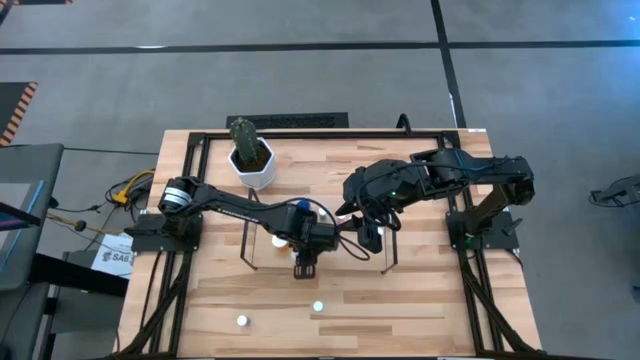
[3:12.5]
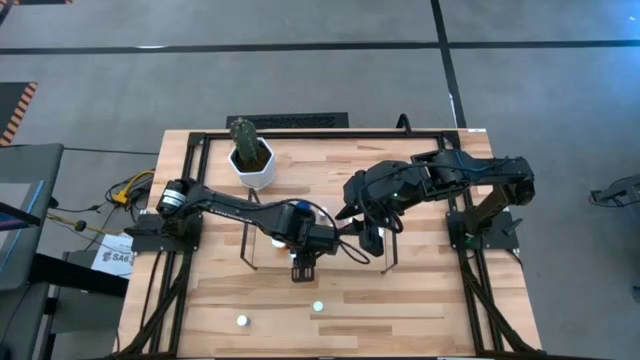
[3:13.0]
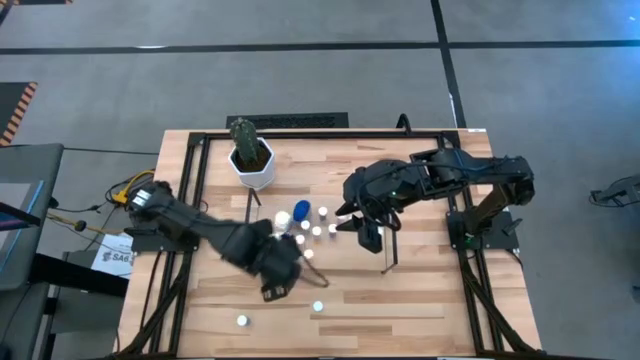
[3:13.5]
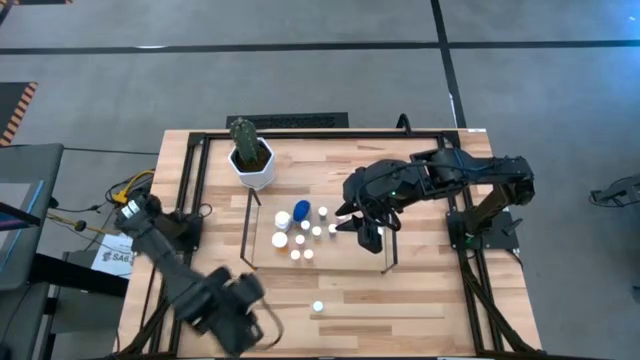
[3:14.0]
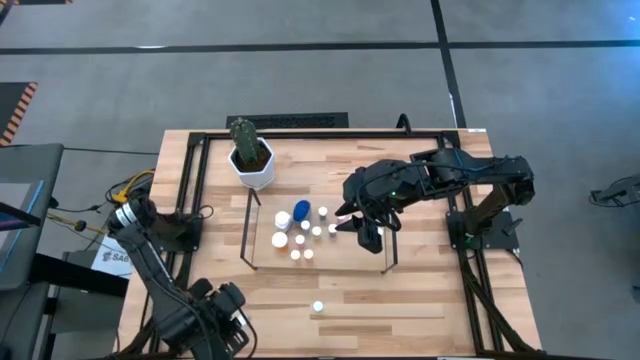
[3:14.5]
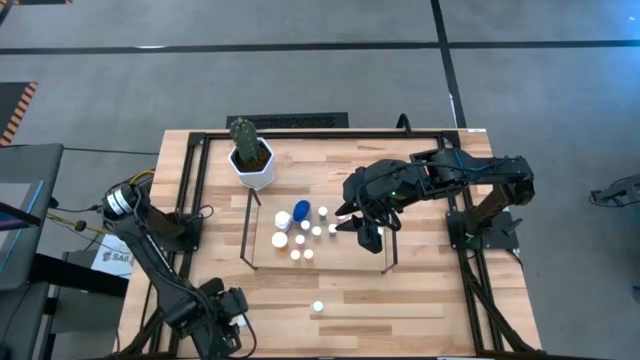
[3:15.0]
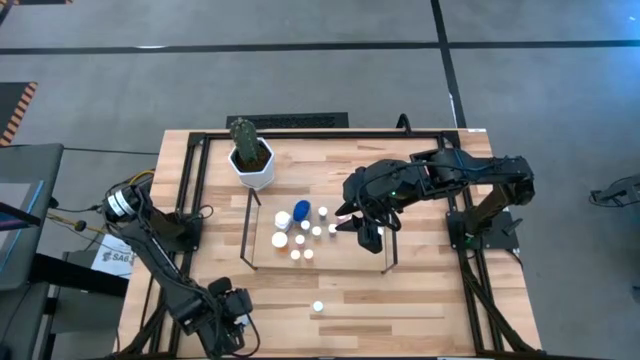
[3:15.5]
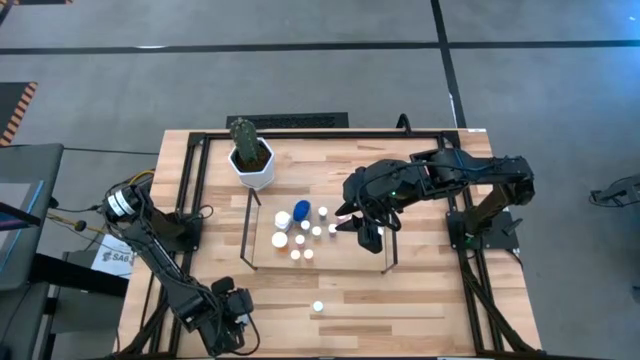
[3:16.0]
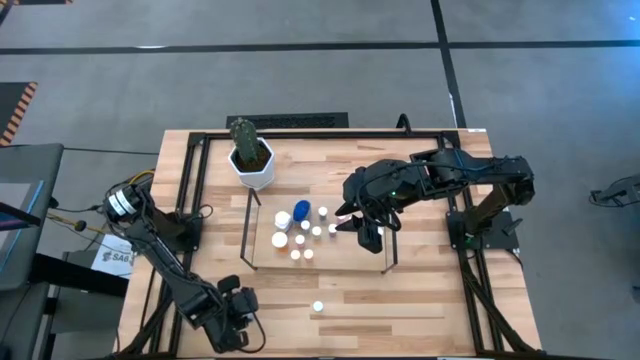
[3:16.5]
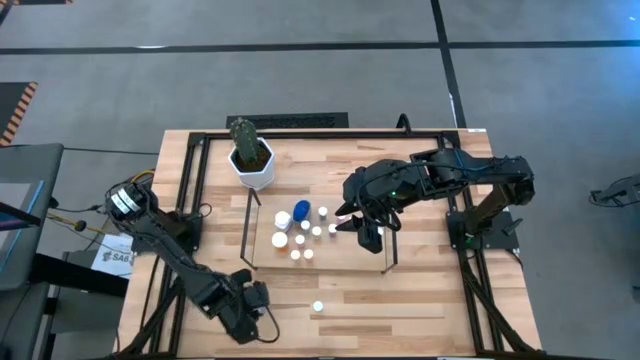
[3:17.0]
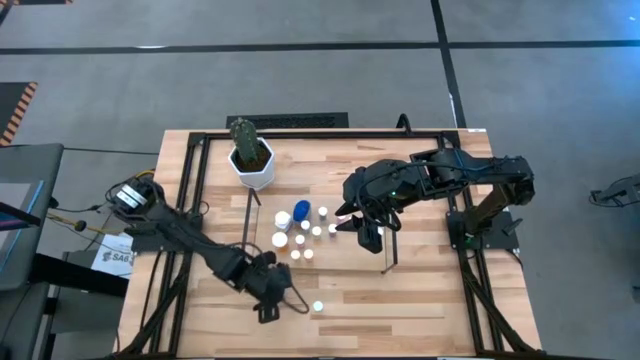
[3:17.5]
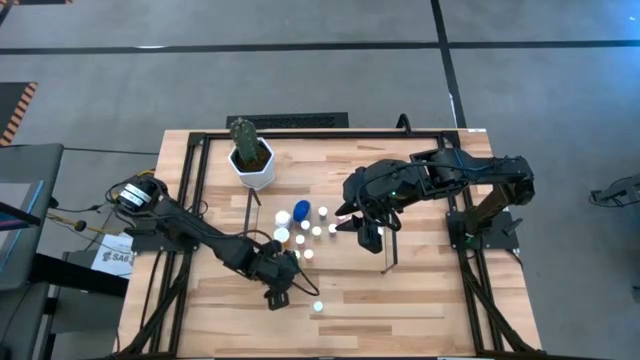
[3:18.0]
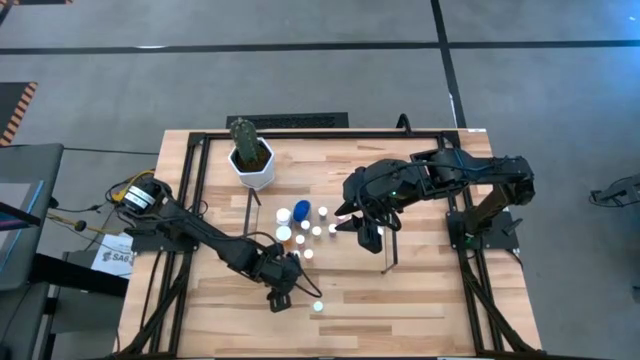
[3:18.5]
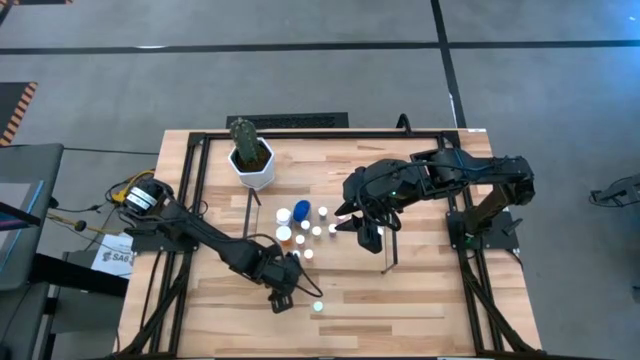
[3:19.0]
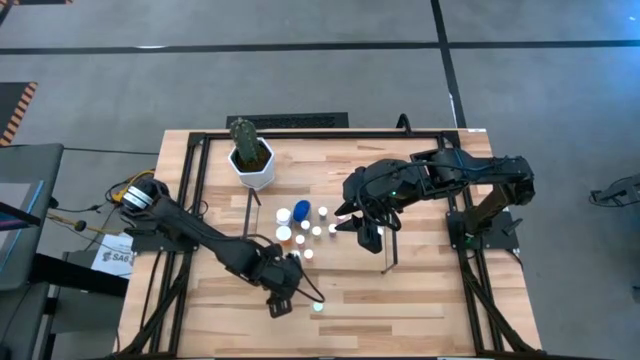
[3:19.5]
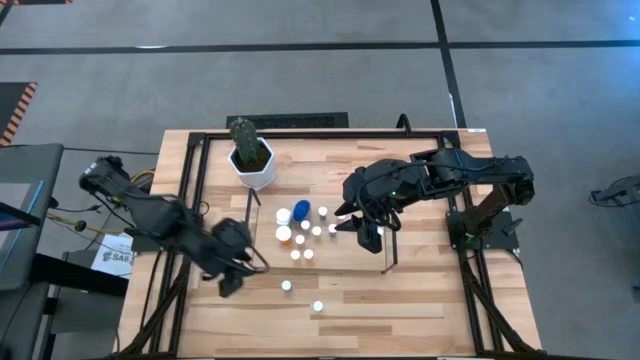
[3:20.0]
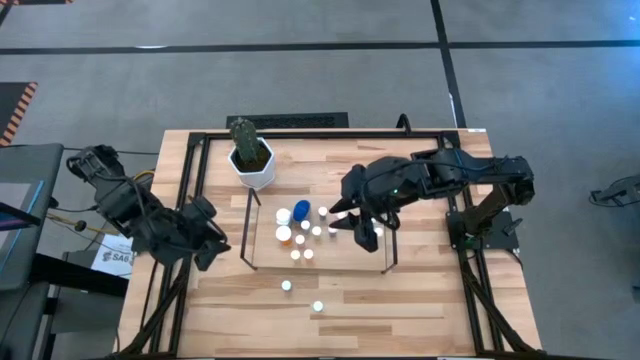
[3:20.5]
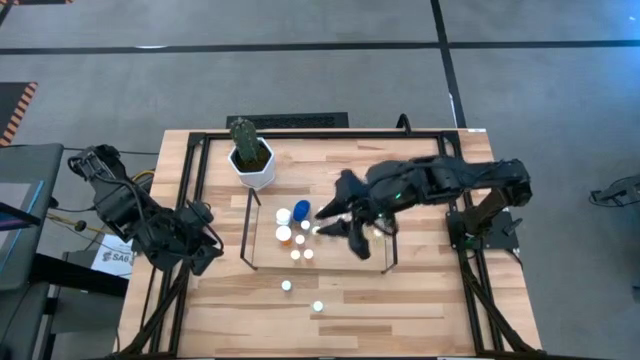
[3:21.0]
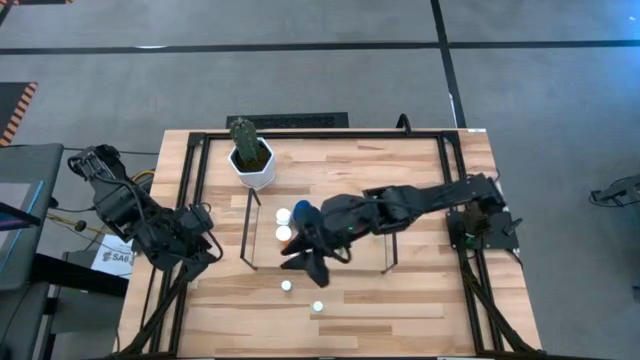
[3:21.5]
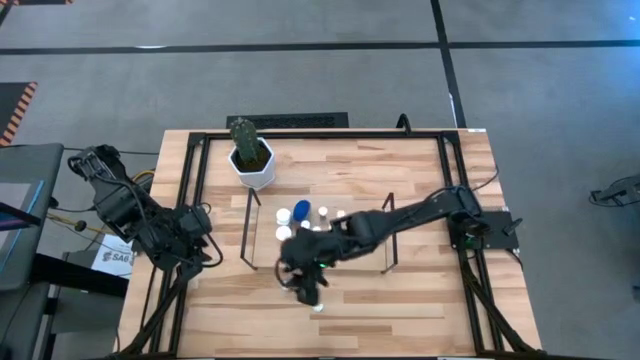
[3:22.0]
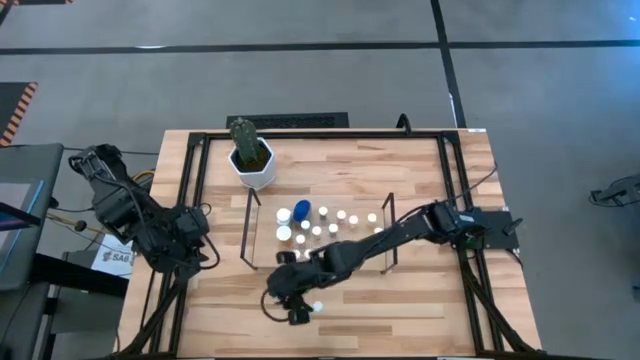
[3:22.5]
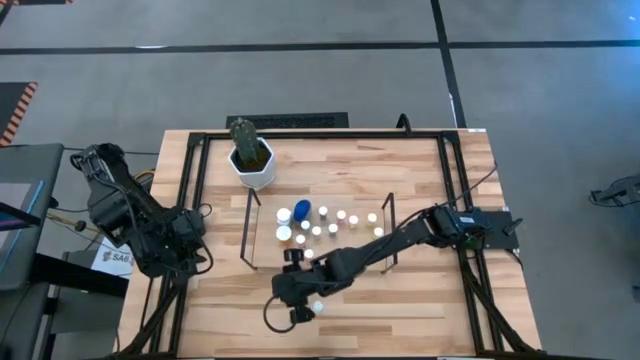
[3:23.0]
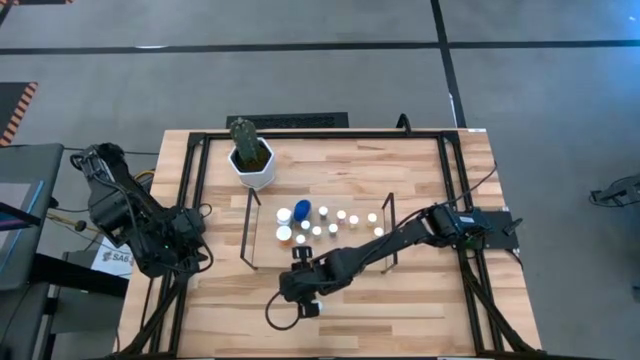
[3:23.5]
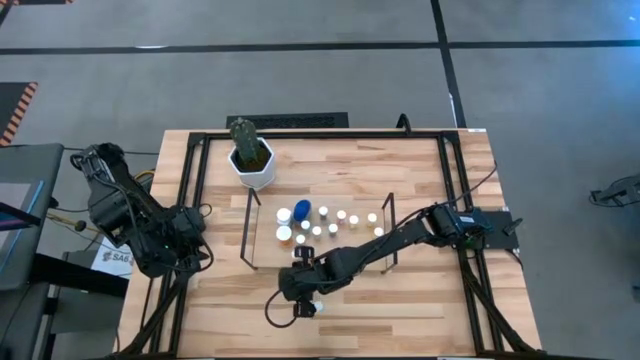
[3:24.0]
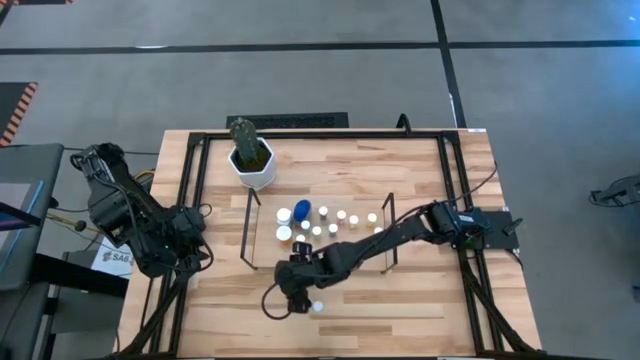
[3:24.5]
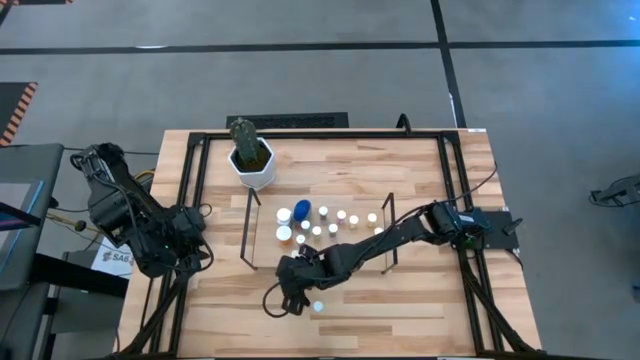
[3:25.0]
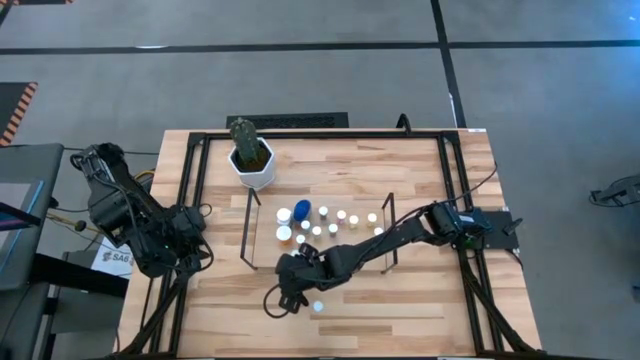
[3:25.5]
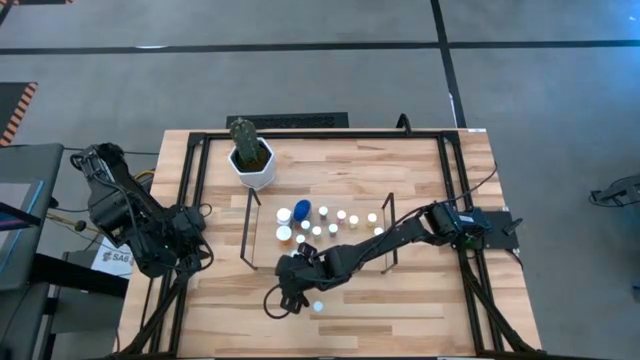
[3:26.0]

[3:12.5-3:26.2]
Task: Pick and place medicine bottles onto shelf by color
Put the blue pill bottle on the shelf

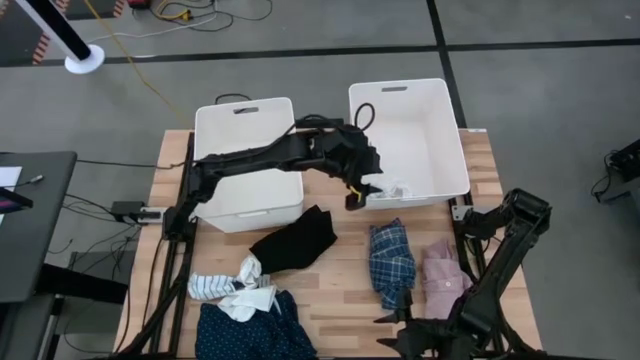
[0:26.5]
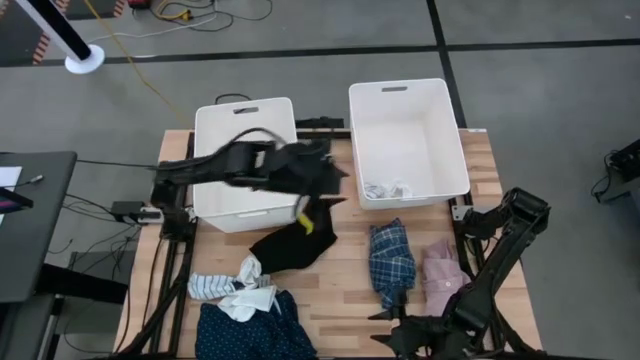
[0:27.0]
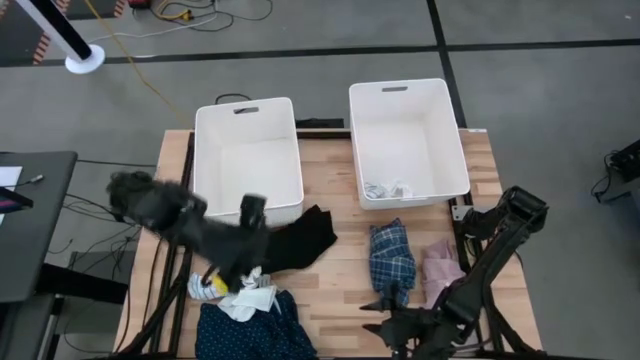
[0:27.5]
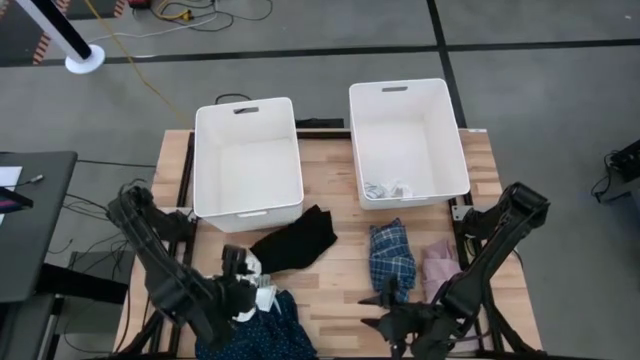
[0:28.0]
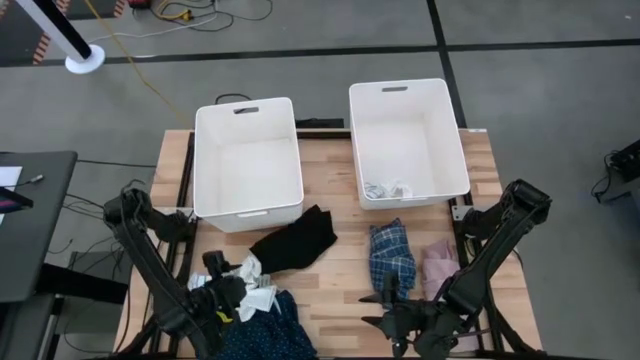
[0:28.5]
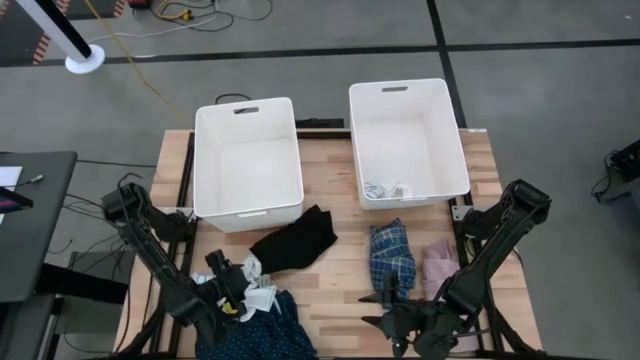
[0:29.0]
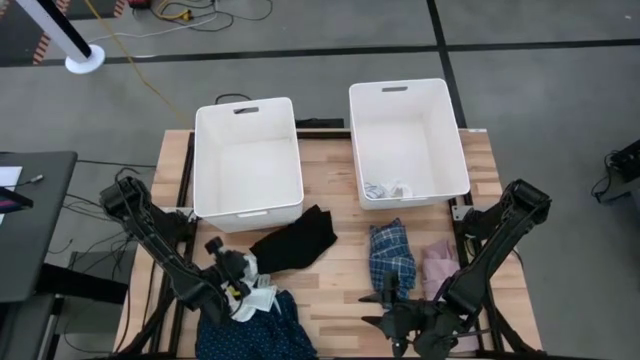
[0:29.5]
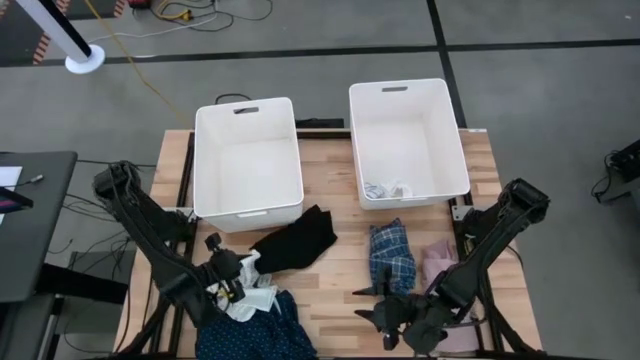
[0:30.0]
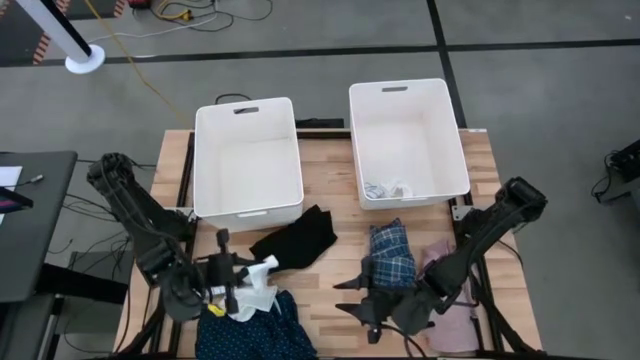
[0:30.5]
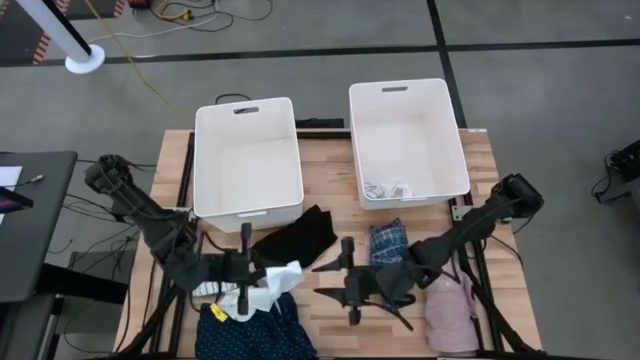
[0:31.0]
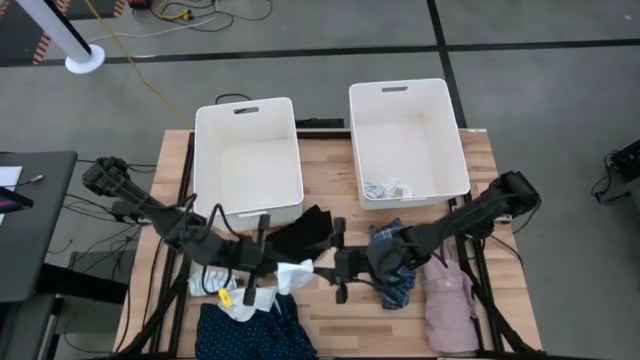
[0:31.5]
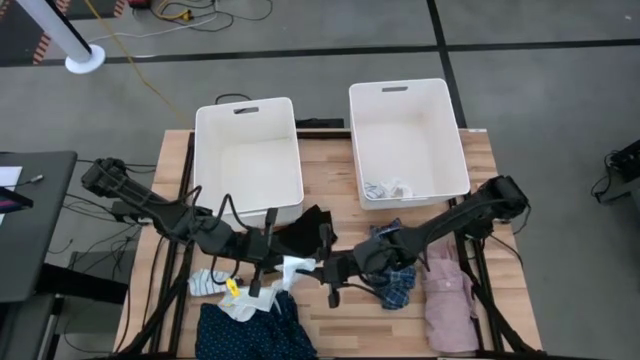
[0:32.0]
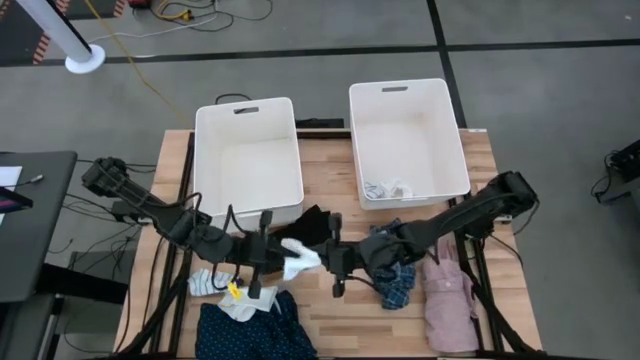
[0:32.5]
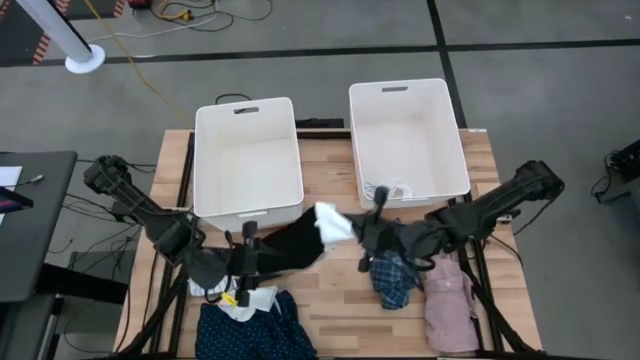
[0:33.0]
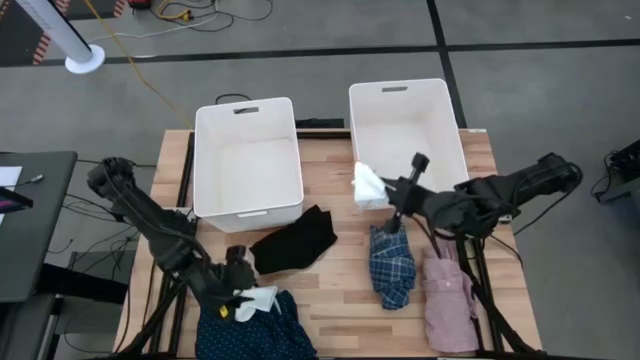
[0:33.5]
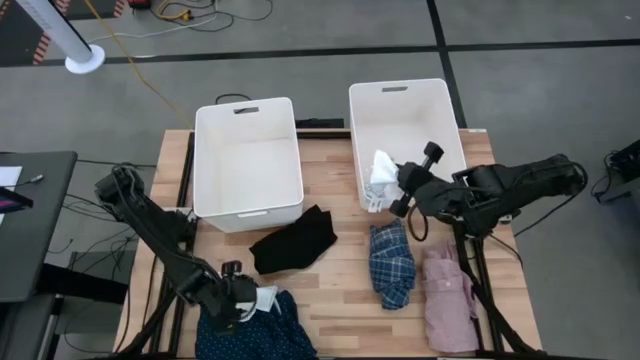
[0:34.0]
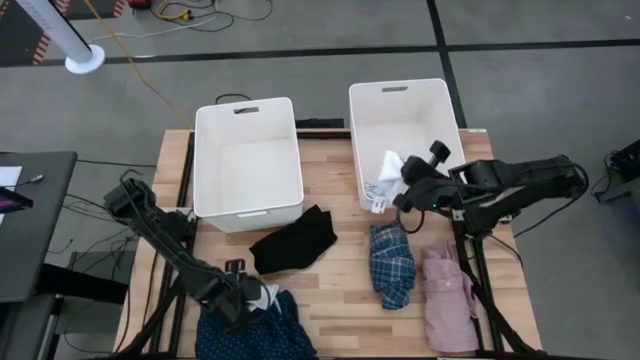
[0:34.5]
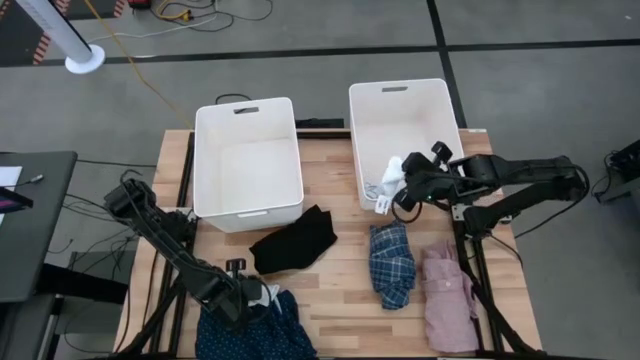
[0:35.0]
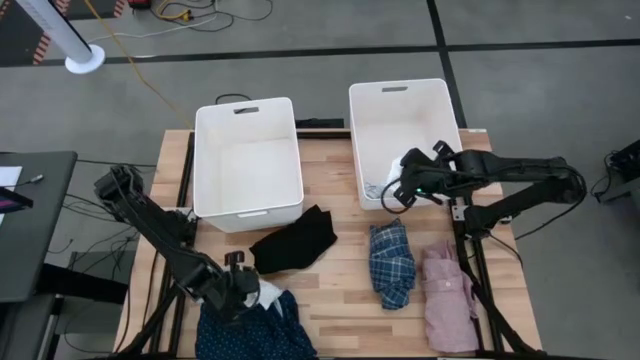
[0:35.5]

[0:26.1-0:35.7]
Task: Sort clothes
Put the white sock into the right bin
